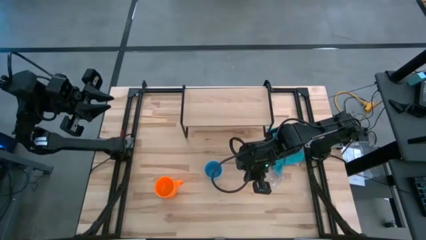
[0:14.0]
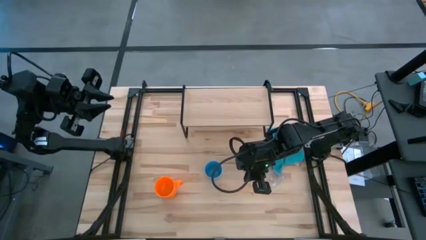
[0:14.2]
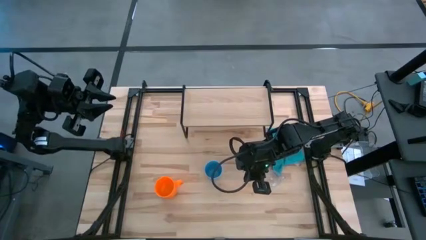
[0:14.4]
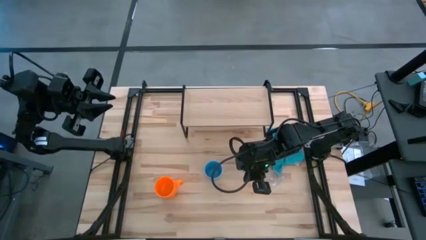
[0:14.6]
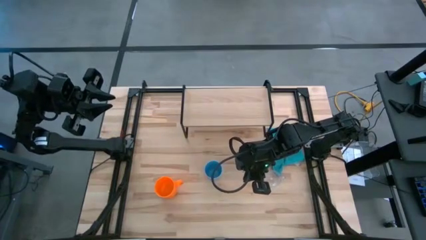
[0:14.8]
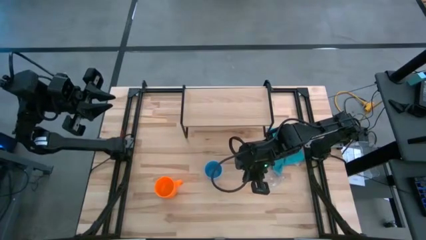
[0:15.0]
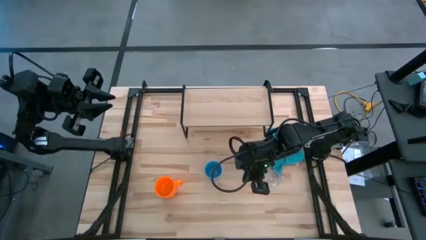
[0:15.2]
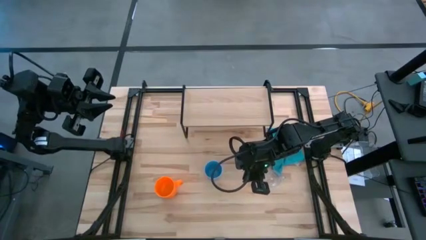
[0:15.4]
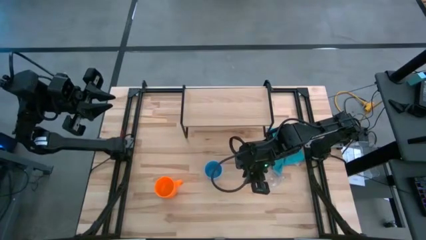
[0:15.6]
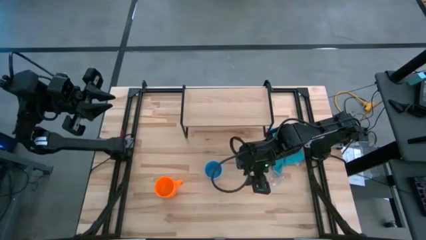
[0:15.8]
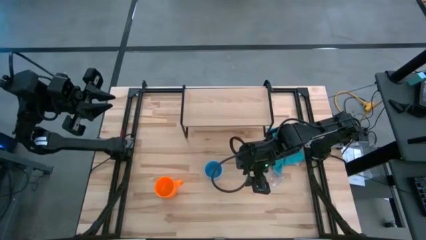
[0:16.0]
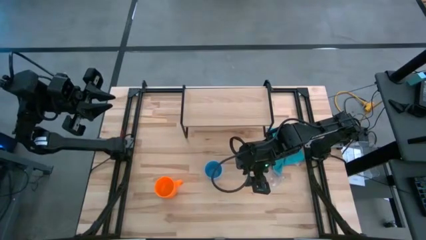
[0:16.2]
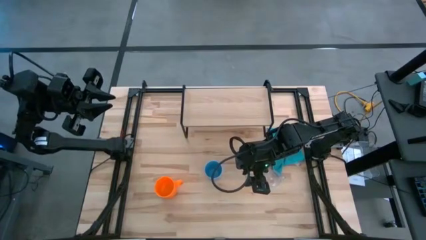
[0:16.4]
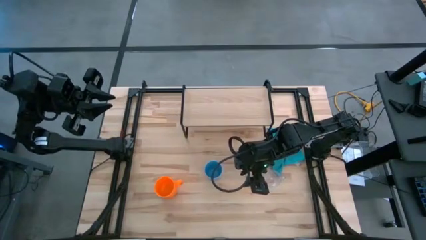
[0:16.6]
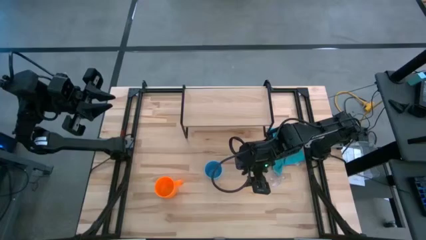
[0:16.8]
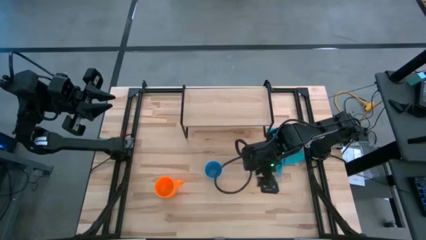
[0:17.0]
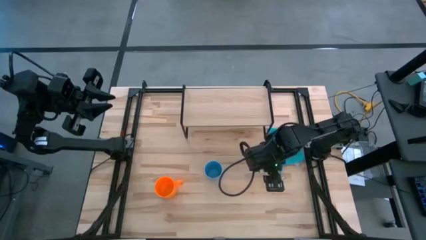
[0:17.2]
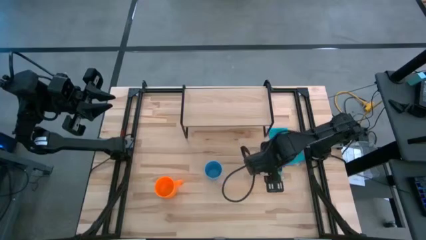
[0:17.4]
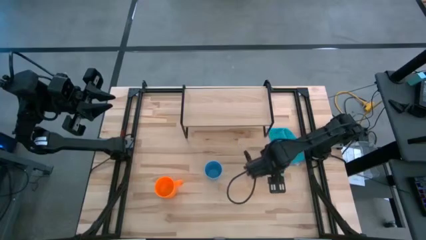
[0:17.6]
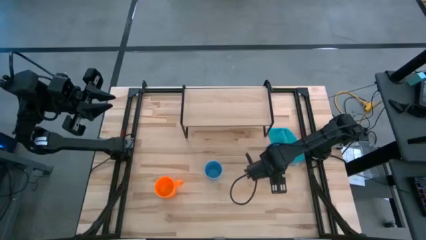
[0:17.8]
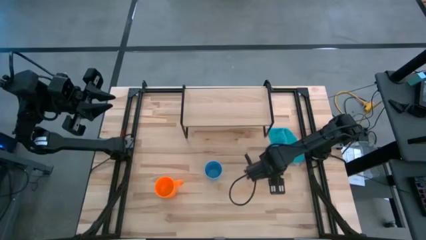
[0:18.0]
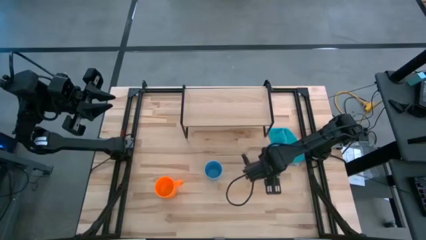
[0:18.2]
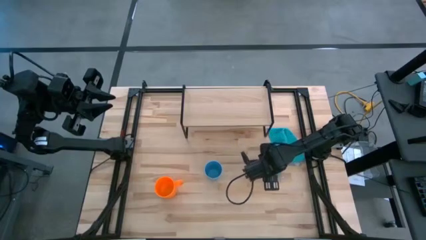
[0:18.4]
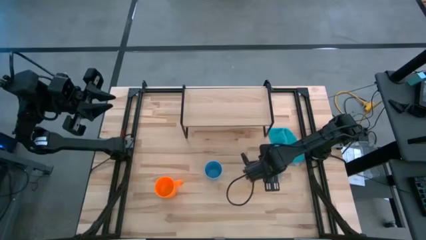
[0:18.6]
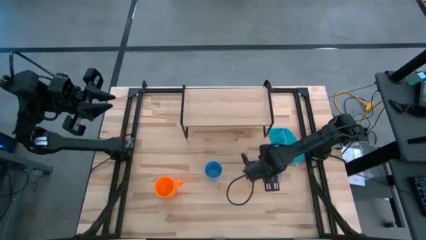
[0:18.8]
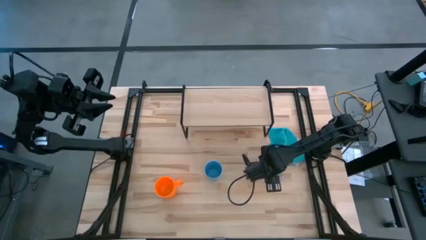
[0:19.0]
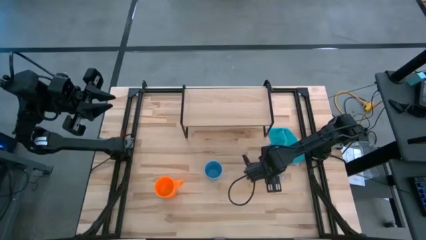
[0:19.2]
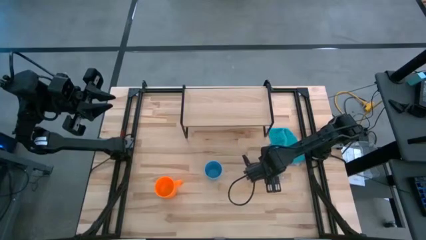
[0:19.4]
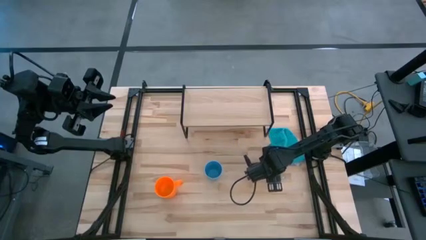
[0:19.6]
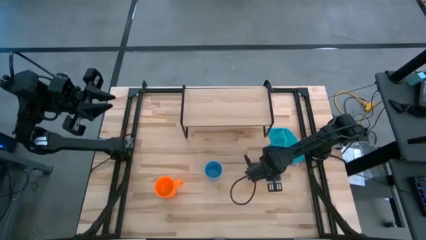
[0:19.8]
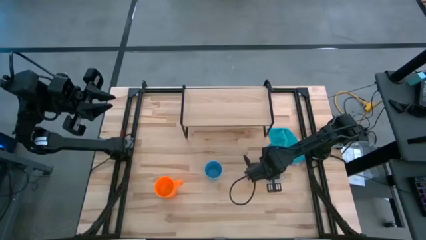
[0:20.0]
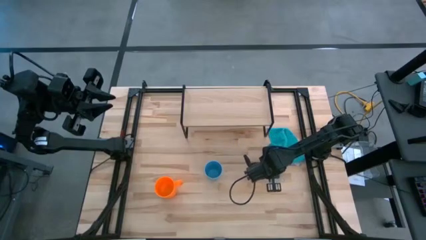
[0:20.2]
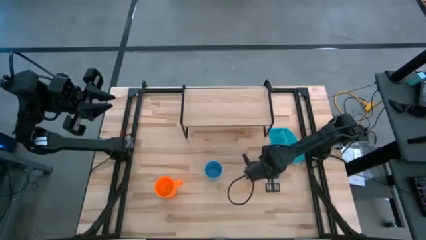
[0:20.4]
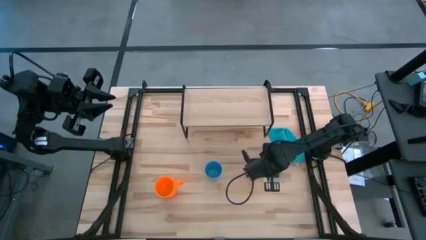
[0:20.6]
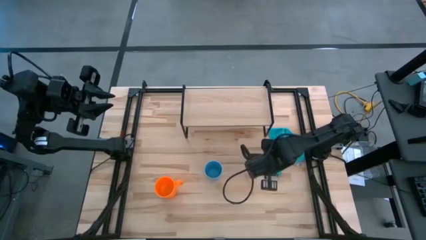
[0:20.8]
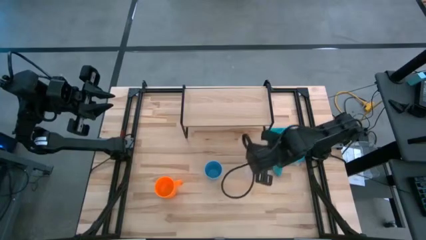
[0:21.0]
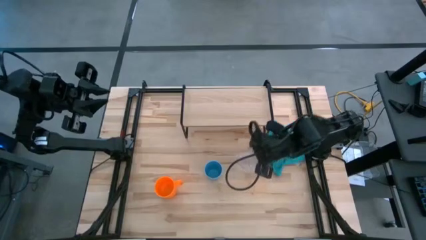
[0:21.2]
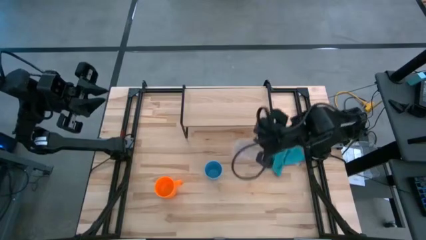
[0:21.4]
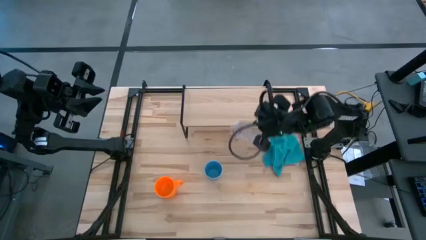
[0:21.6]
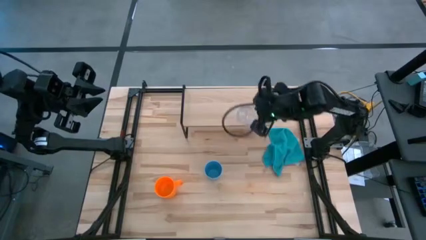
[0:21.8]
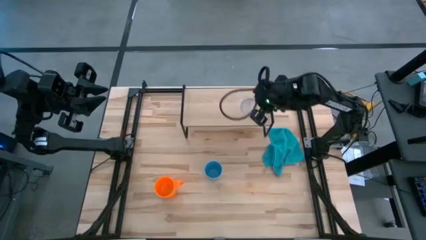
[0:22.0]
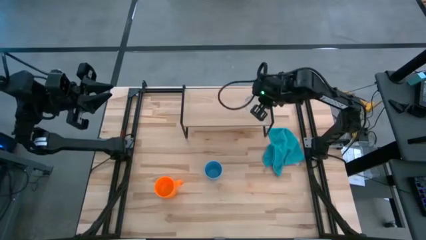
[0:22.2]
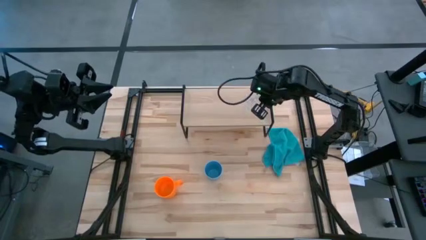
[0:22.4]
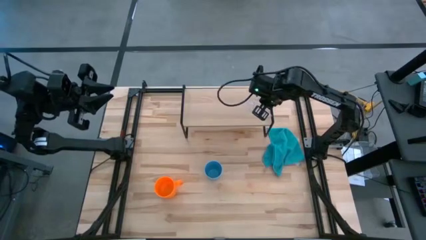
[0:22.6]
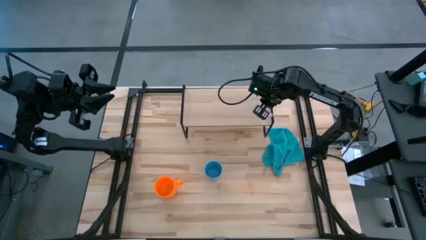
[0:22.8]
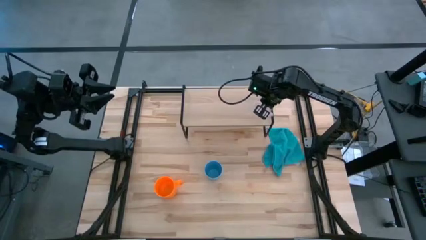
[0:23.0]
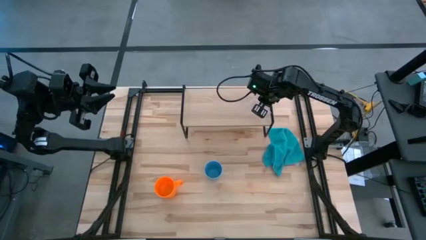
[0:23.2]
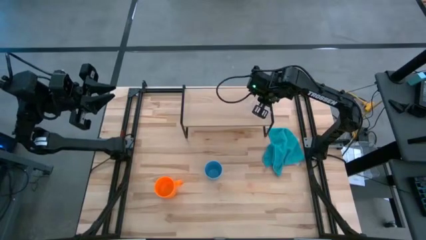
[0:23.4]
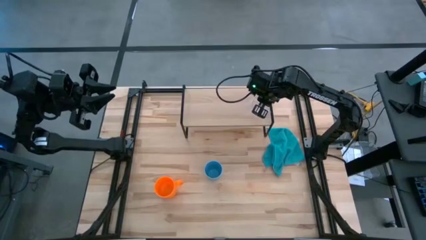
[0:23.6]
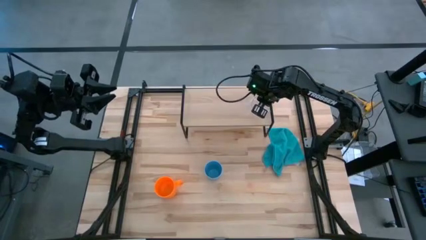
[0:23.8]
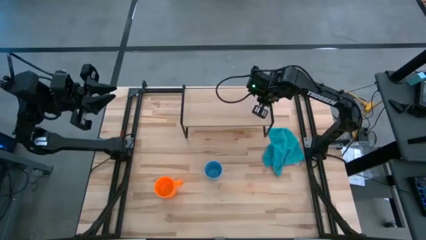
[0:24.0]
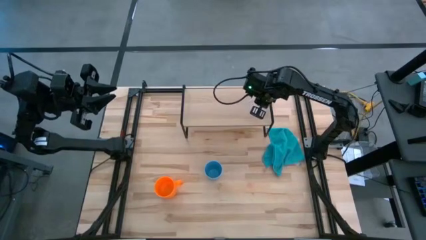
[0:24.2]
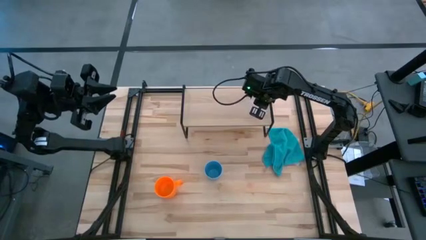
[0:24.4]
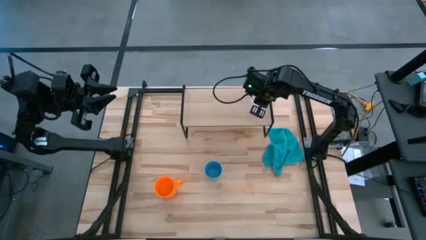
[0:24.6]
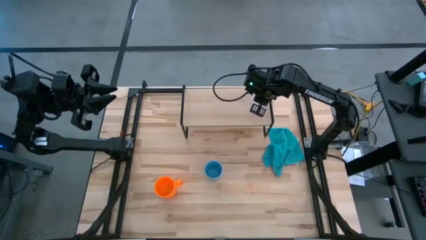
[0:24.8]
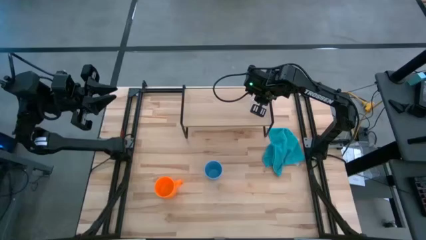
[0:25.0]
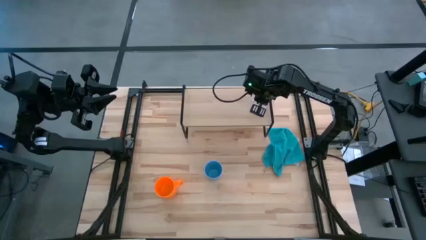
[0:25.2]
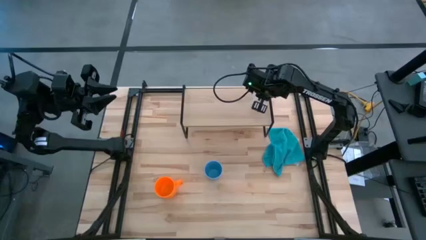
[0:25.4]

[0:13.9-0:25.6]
Task: Stack small to large cups/mugs on shelf
Put the transparent cup on the shelf
